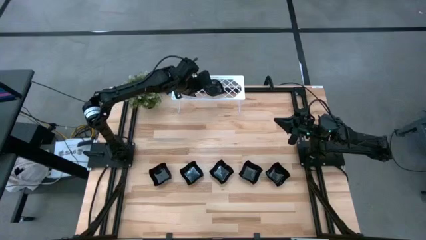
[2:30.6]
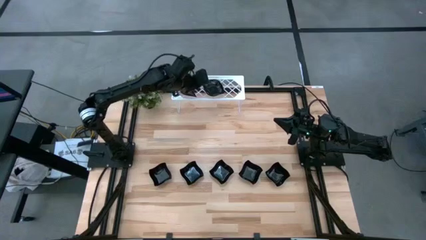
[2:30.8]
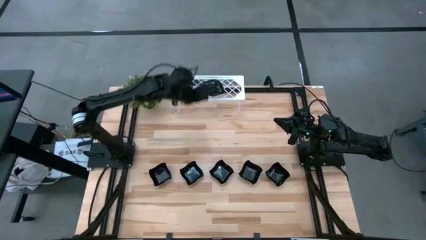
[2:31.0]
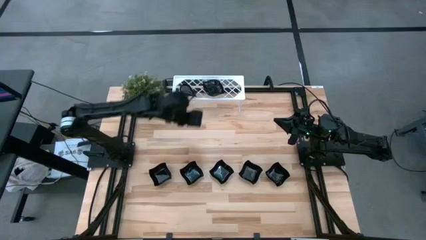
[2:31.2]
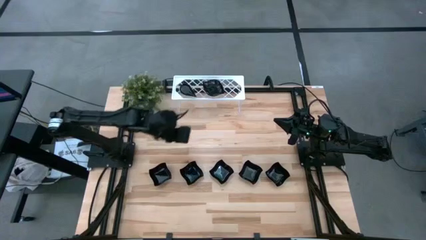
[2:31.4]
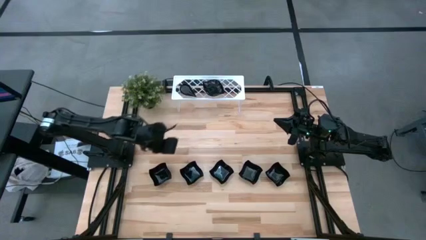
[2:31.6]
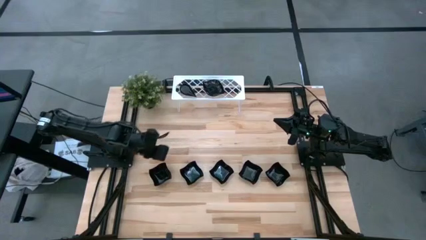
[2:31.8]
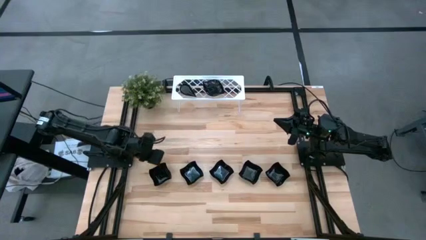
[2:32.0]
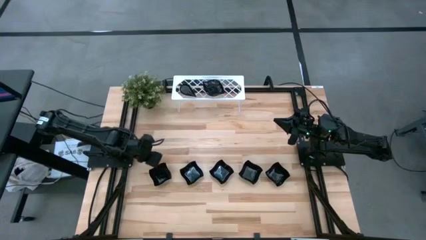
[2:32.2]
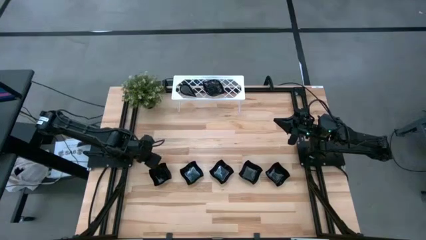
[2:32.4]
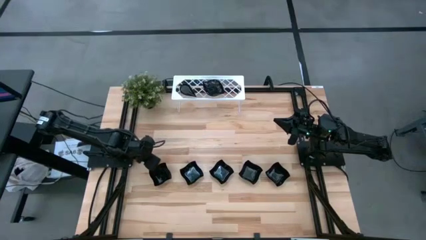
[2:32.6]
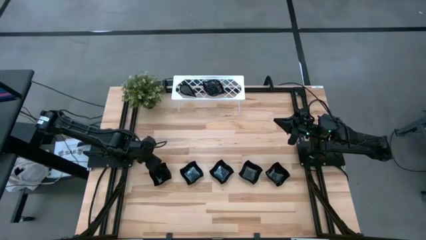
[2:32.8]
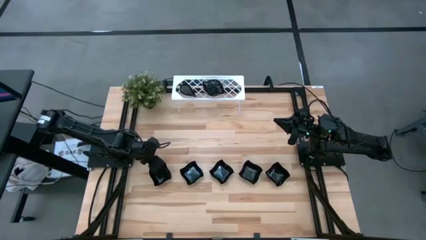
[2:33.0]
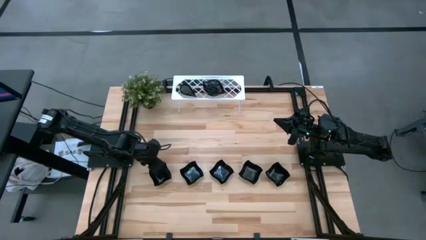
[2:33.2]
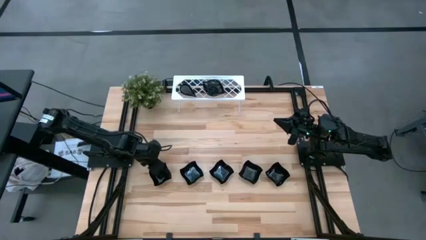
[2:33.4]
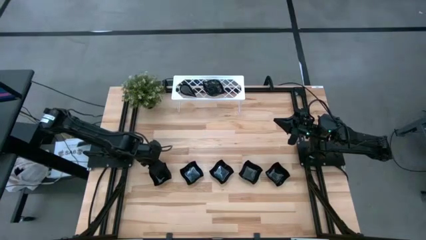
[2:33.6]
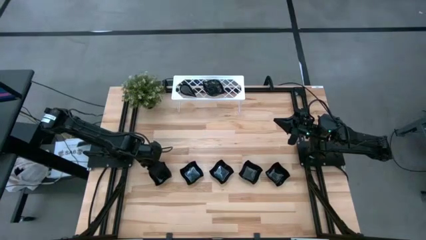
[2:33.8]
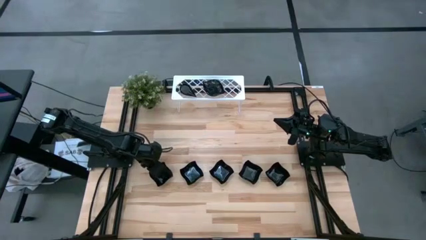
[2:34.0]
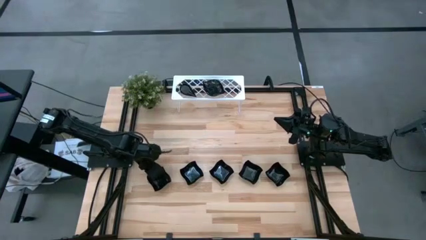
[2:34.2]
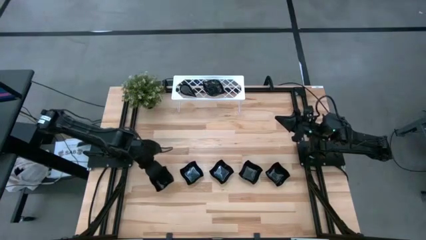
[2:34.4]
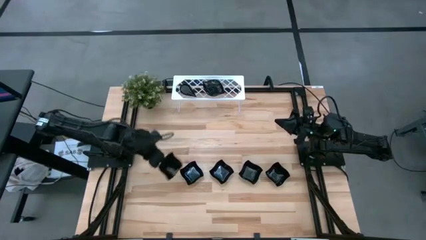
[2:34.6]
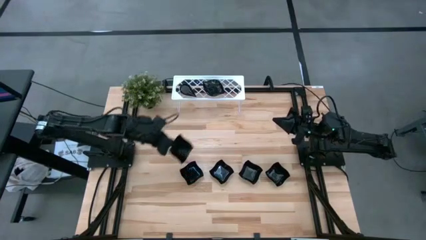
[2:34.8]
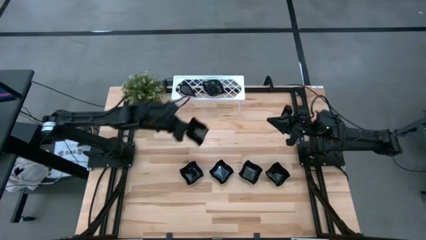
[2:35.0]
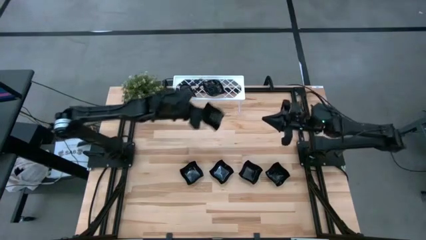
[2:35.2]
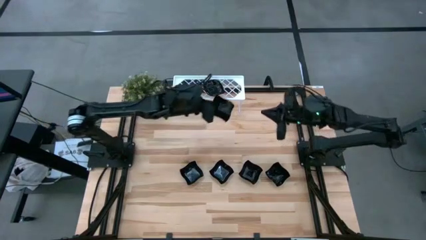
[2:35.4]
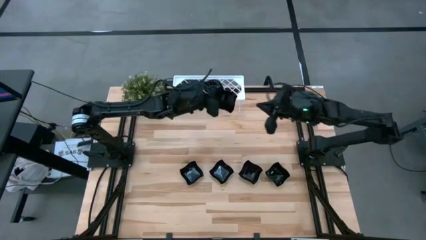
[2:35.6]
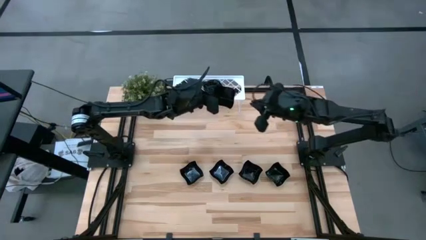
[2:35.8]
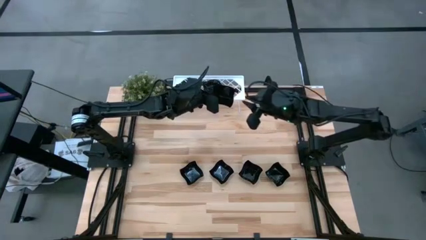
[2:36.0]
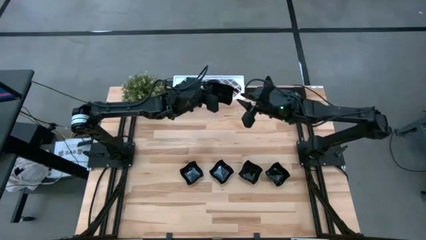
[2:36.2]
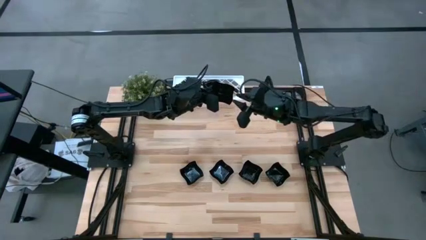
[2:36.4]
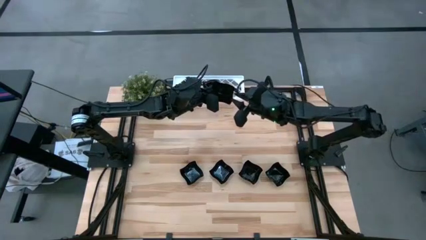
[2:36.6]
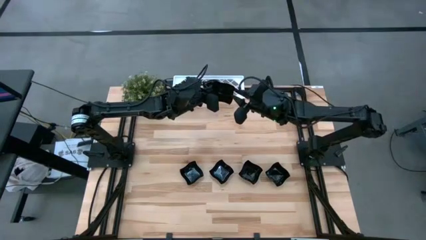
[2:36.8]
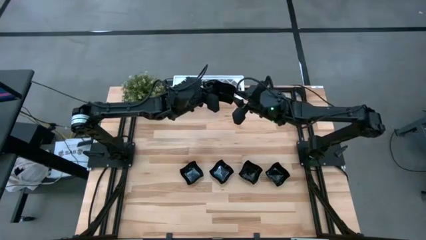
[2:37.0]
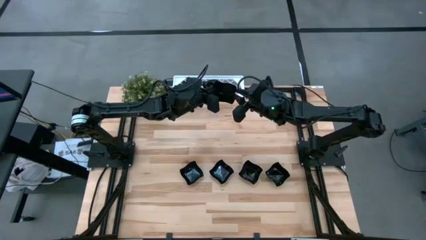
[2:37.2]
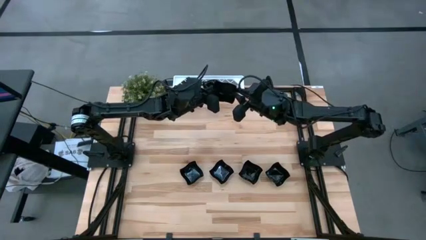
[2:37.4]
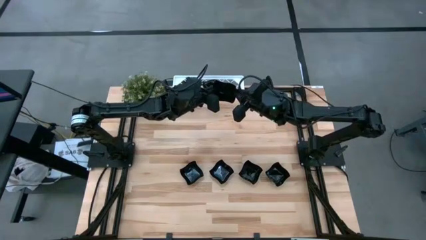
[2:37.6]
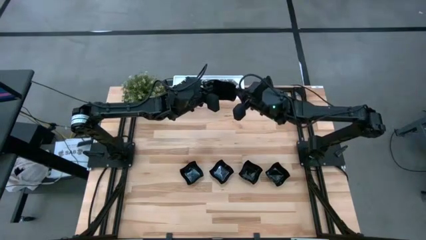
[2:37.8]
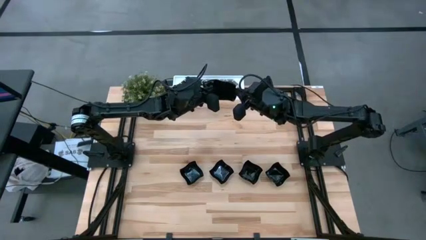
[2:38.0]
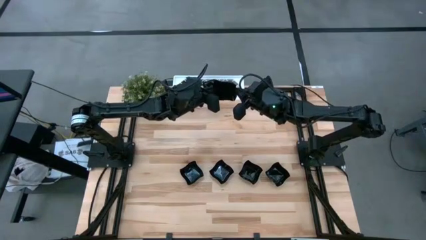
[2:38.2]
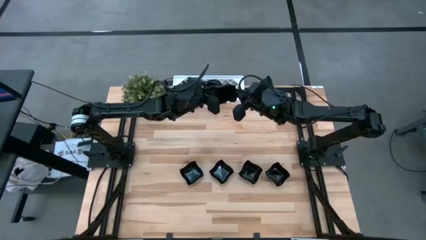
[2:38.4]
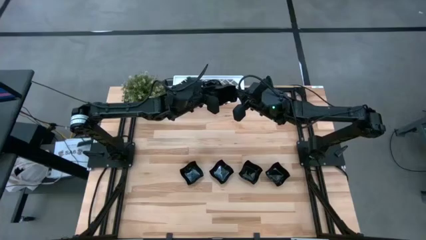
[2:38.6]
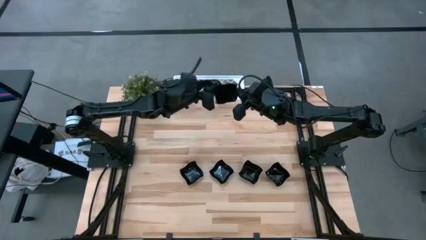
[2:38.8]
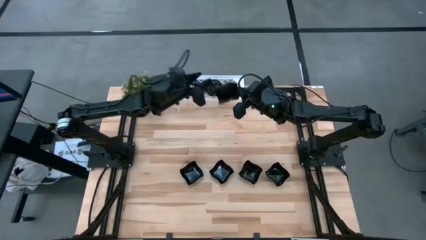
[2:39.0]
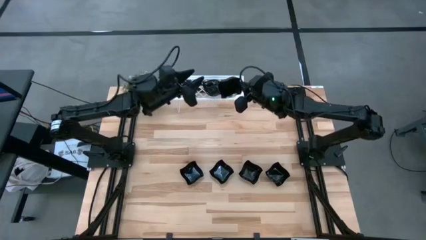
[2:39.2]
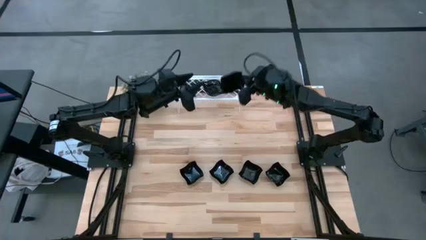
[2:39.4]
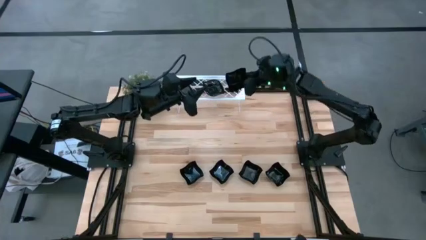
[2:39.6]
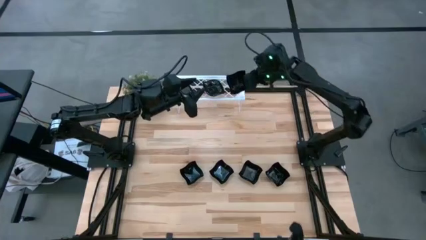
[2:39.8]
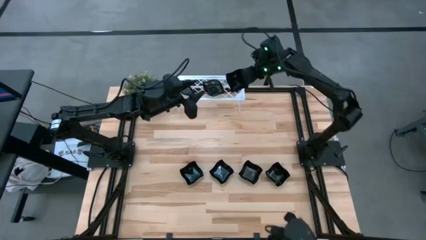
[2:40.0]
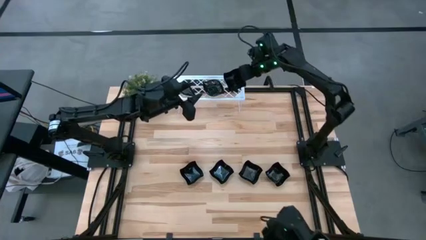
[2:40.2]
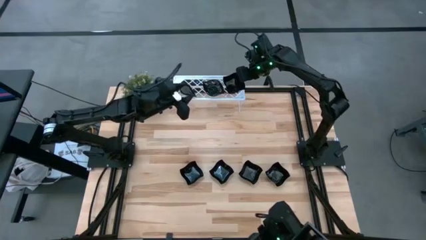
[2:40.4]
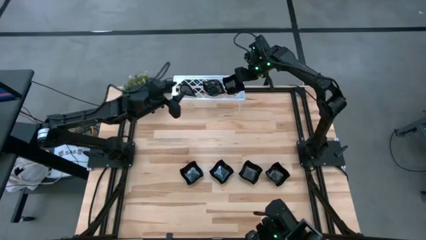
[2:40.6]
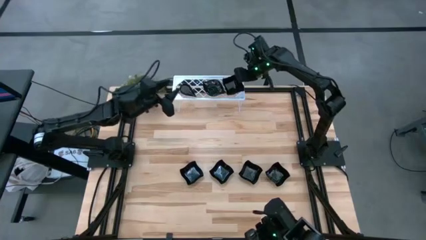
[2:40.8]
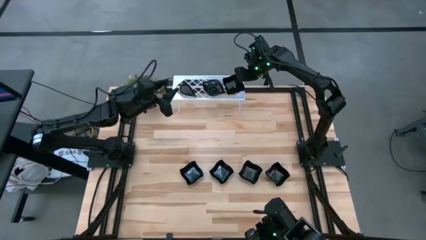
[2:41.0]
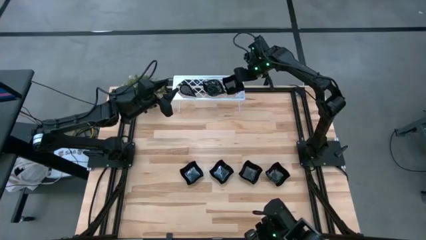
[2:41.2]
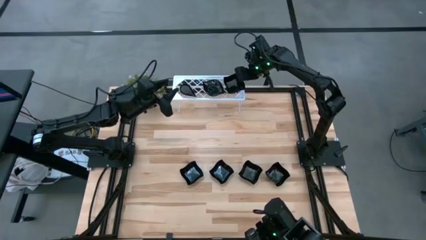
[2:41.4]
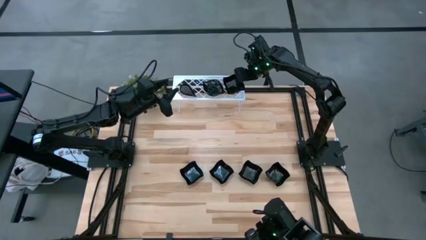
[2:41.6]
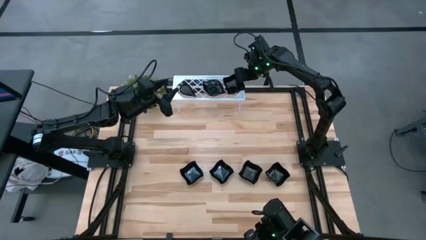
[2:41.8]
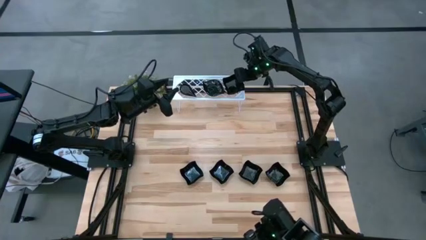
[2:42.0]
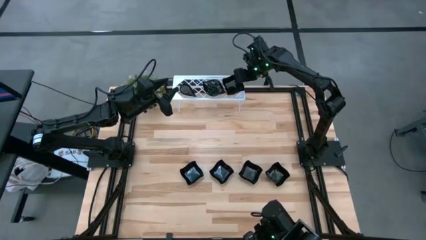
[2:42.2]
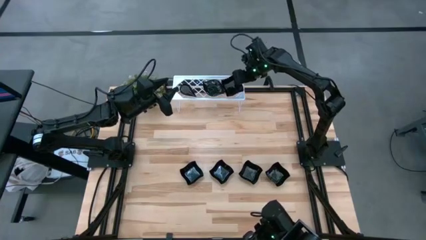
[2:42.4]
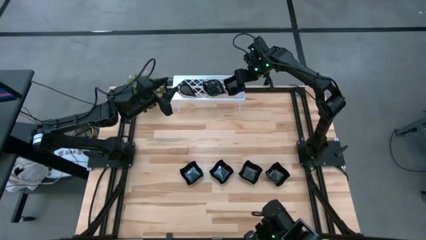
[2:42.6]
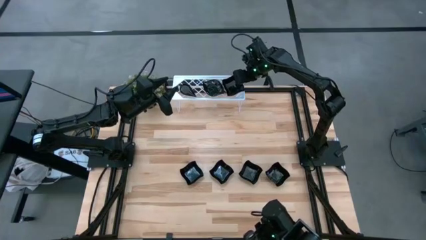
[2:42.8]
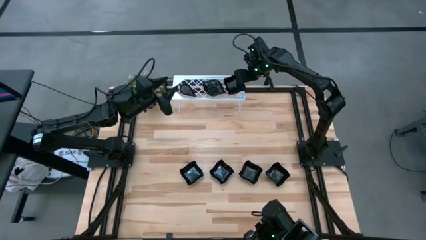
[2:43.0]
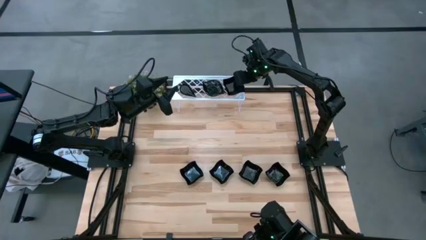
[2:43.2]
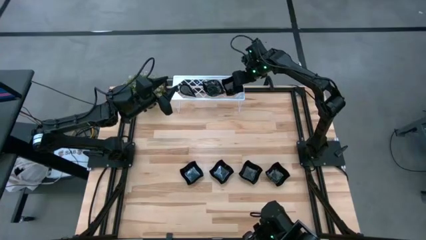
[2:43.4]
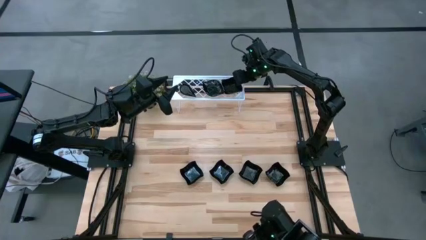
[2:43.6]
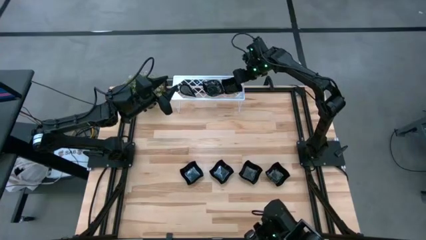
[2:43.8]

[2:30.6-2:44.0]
Task: Pick & Place Mini shaped plates
Put the black distorted square plate on the shelf
